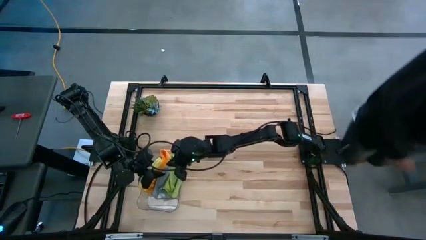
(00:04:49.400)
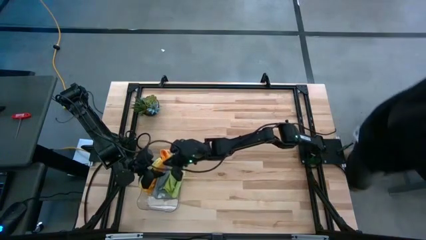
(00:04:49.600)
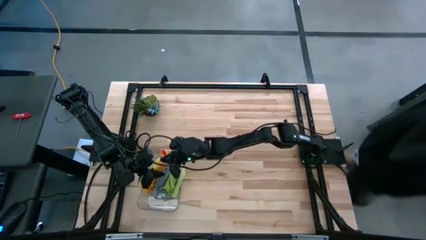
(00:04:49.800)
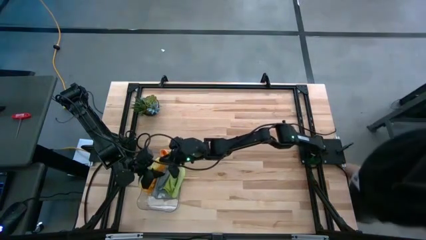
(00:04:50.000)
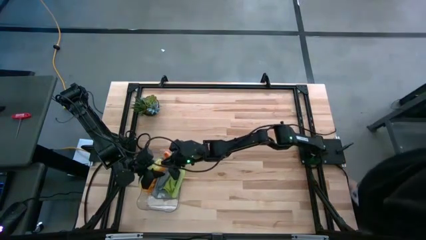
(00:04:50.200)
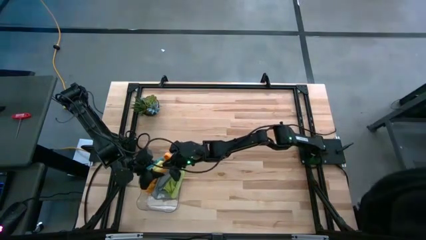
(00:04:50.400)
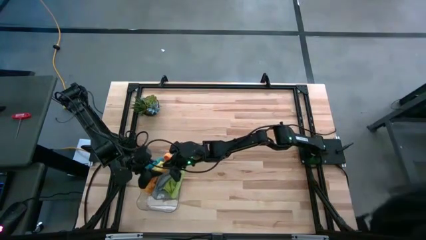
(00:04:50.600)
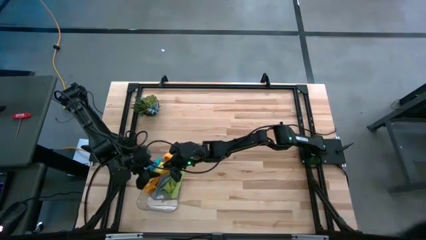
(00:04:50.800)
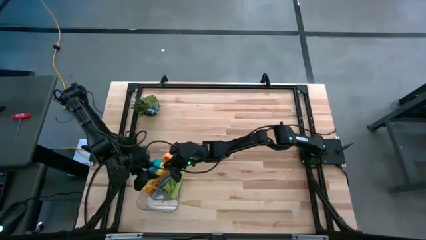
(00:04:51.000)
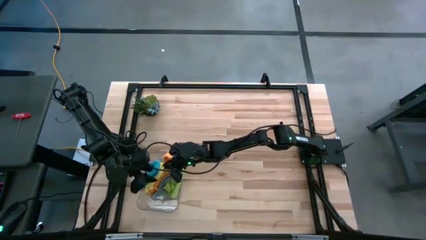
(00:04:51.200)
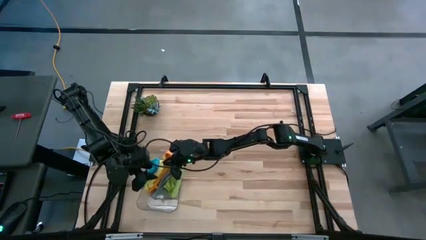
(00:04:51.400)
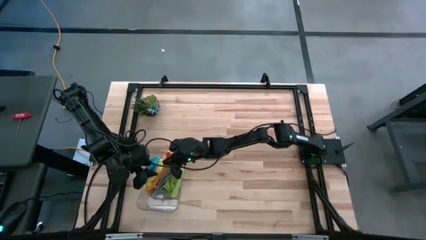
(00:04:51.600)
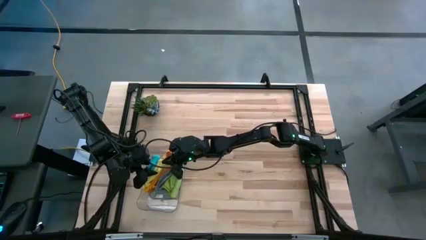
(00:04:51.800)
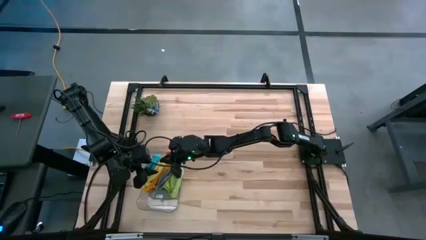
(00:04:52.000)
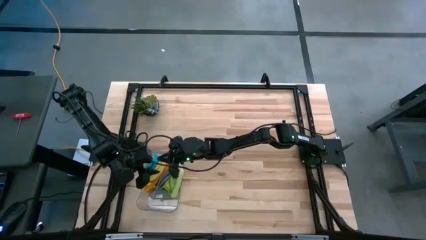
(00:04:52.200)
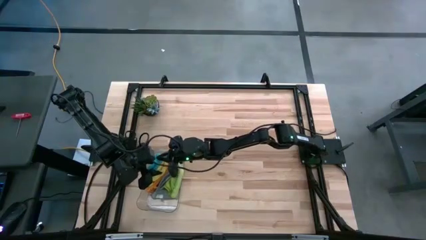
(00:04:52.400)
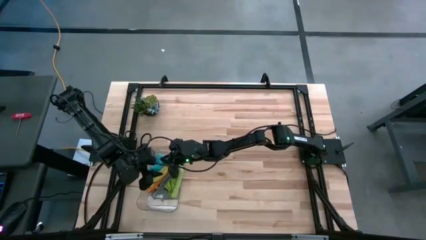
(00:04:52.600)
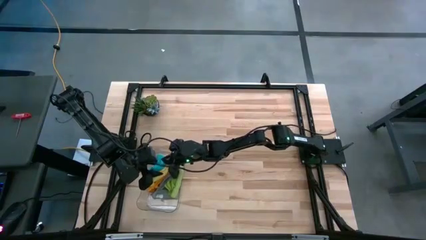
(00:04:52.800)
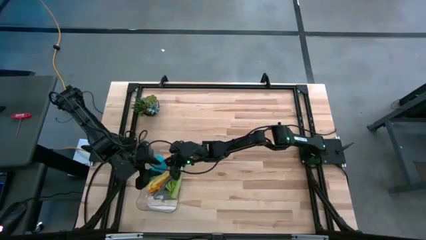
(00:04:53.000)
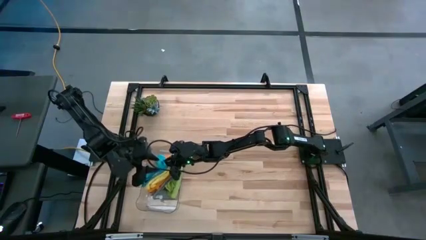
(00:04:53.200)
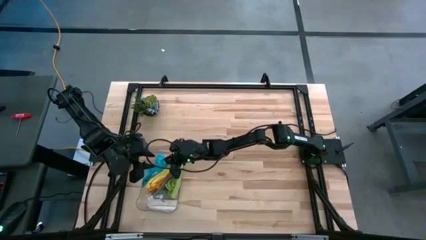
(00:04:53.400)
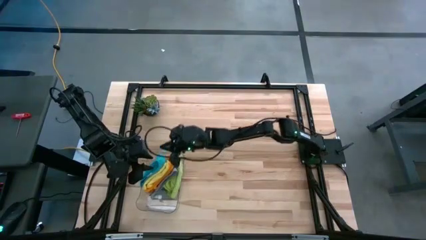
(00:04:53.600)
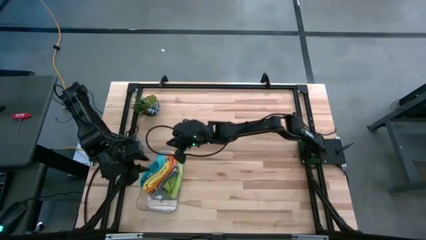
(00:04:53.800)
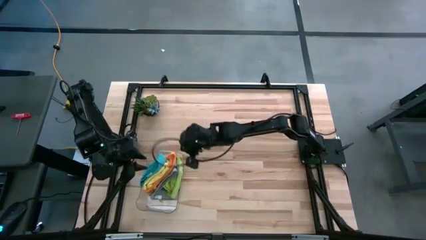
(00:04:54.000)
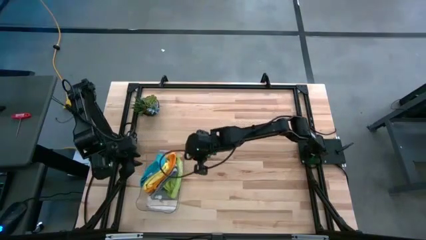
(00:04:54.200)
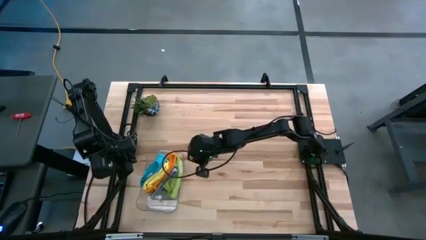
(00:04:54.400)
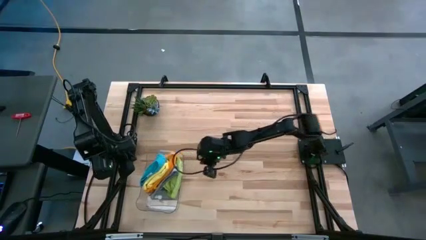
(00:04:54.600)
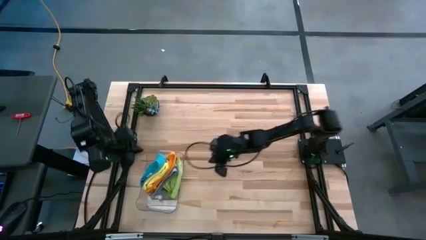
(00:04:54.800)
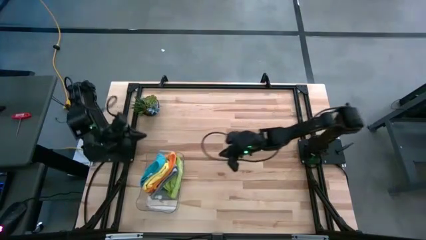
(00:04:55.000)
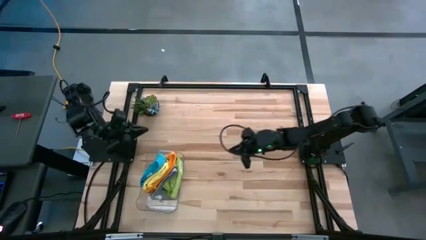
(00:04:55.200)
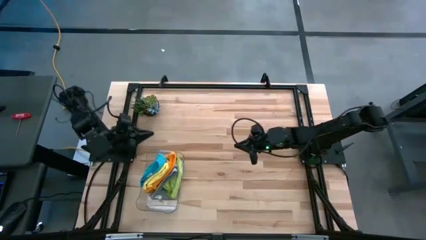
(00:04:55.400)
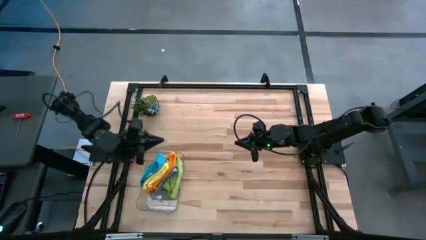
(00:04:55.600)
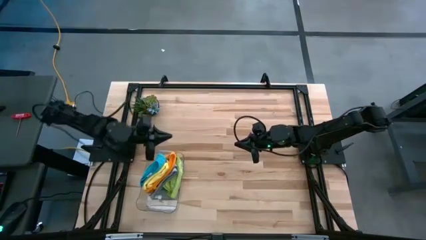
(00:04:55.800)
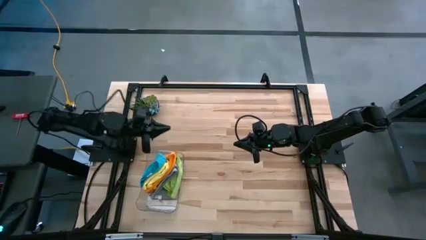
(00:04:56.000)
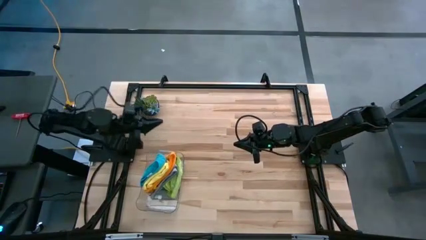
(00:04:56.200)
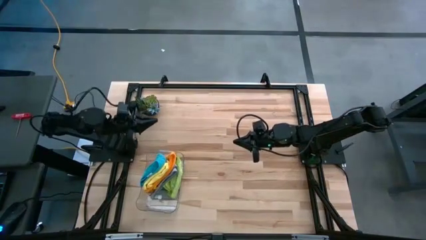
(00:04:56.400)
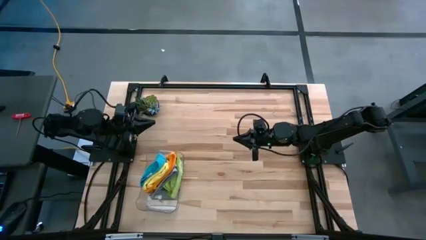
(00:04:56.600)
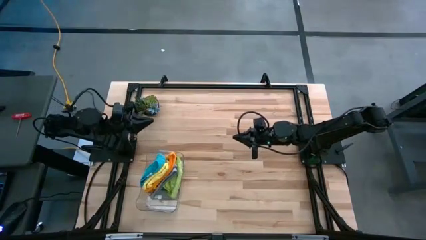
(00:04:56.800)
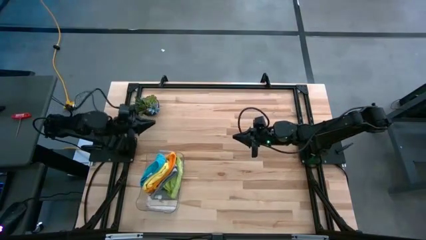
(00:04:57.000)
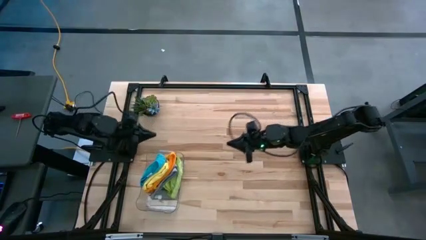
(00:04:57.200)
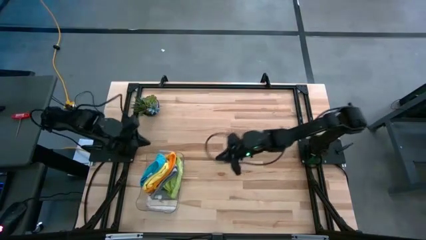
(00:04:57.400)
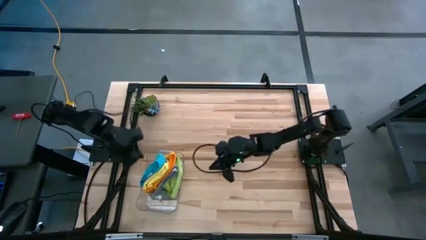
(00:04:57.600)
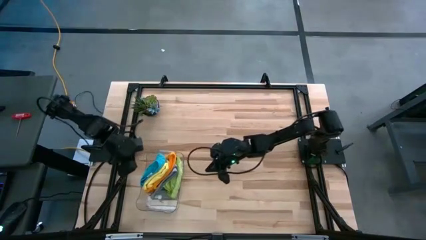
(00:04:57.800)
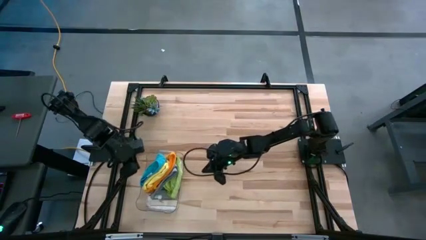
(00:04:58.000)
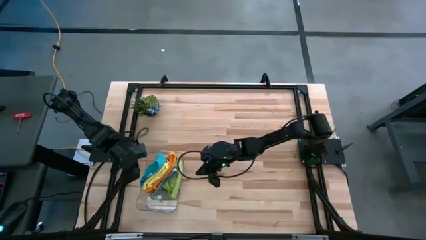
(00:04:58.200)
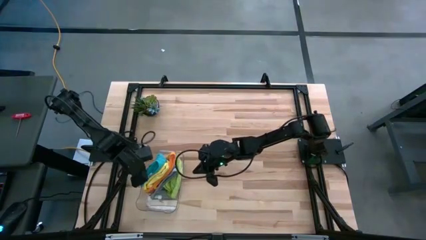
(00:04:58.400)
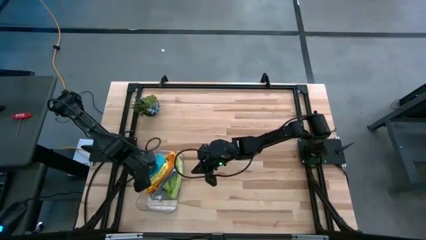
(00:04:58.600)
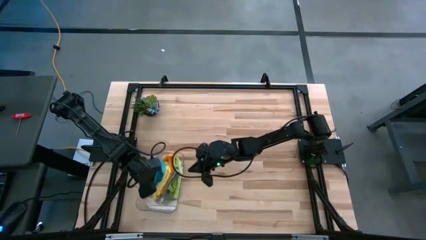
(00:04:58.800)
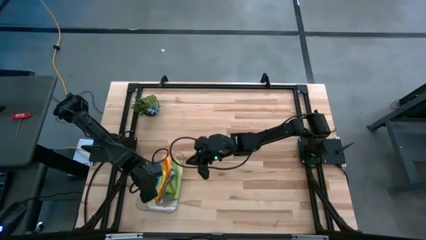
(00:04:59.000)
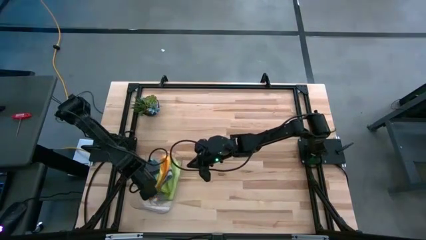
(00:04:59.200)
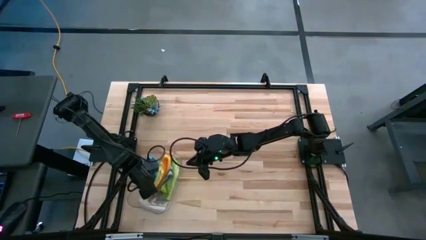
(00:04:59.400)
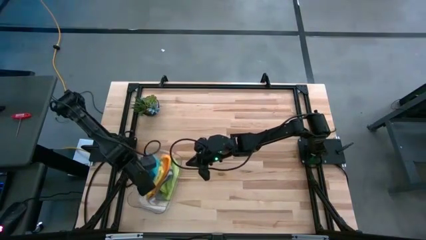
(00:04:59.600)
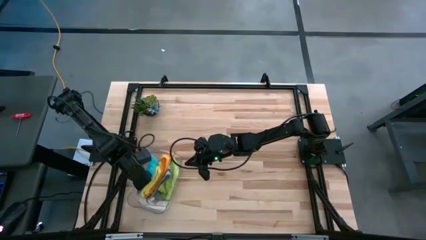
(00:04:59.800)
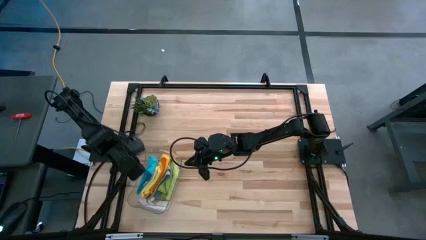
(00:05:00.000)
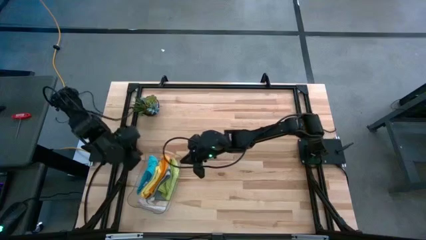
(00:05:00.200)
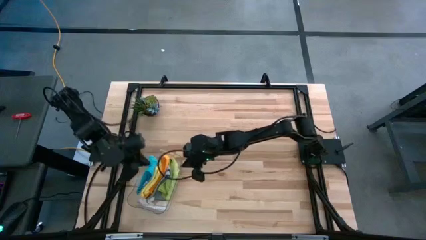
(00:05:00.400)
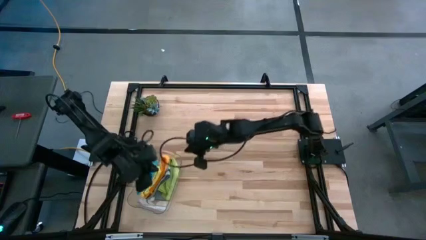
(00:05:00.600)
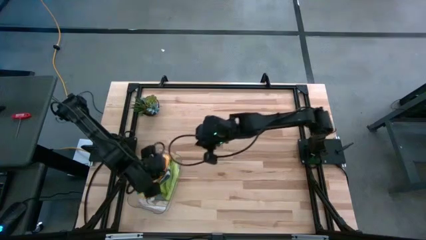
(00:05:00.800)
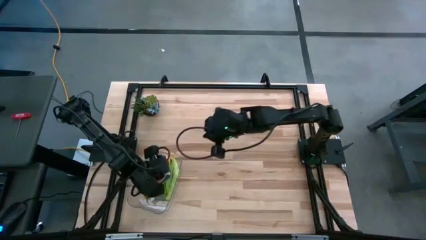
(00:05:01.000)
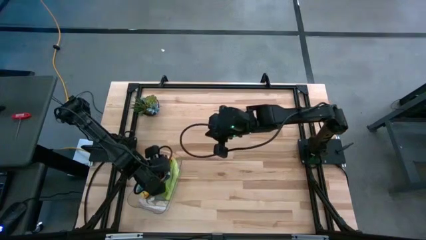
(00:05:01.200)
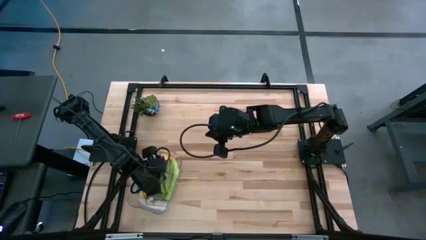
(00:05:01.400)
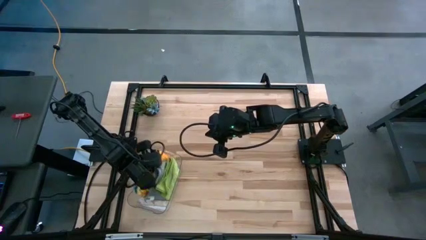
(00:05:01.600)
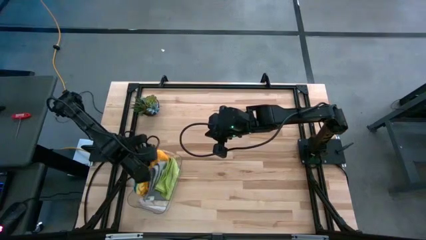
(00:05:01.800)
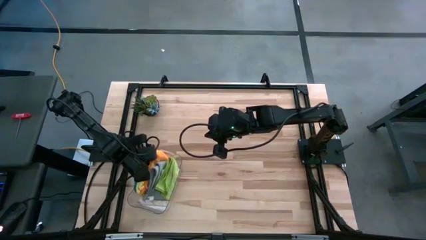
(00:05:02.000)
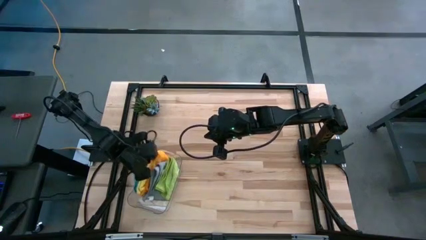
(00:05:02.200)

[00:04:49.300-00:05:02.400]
Task: Fold microfiber towels
Put the stacked towels into the transparent bin

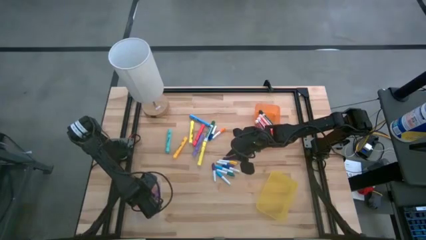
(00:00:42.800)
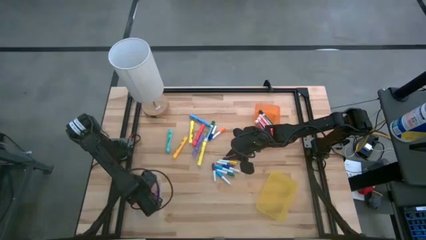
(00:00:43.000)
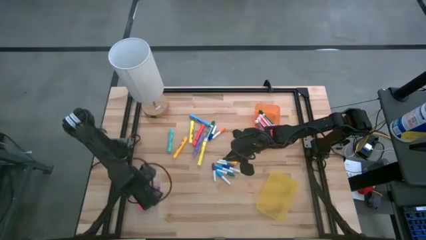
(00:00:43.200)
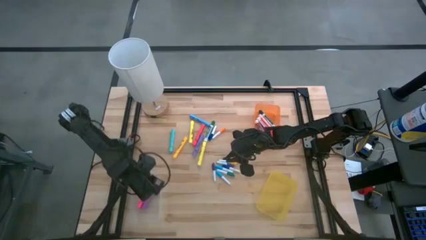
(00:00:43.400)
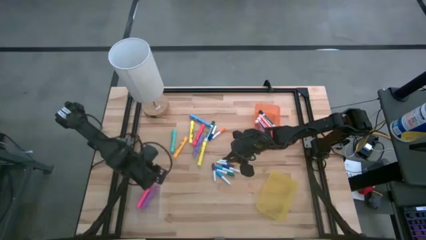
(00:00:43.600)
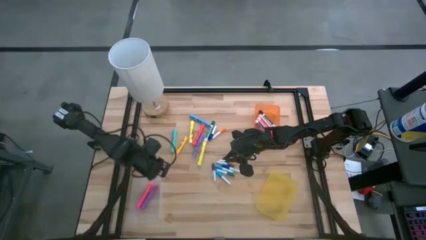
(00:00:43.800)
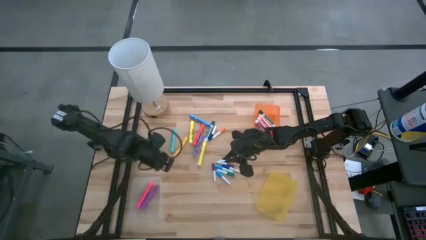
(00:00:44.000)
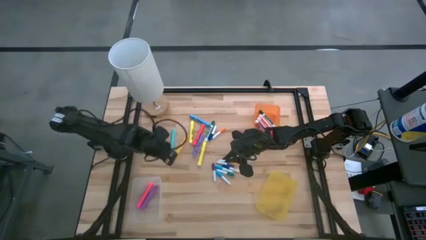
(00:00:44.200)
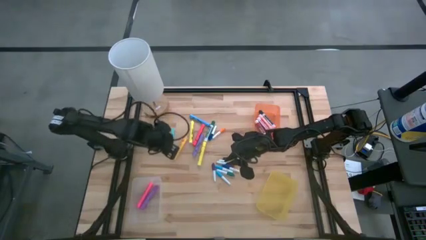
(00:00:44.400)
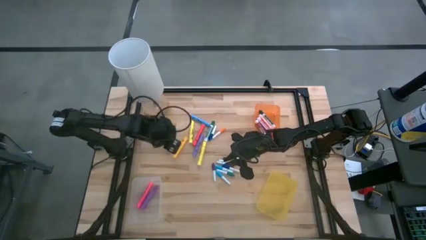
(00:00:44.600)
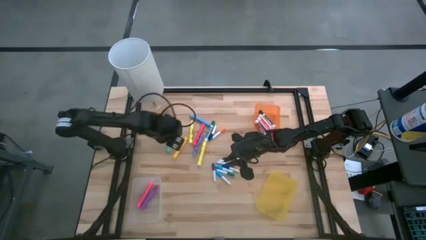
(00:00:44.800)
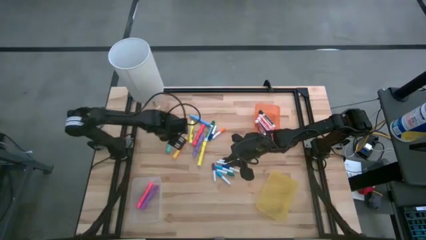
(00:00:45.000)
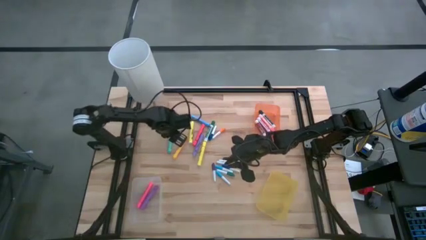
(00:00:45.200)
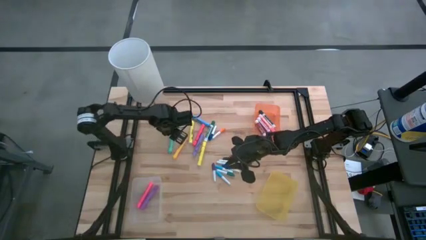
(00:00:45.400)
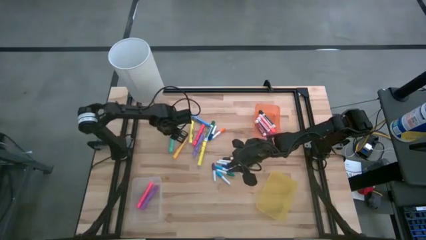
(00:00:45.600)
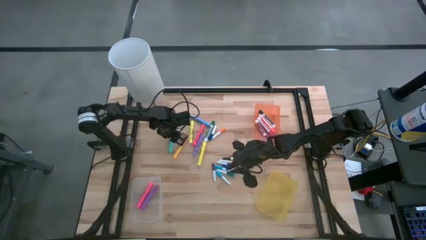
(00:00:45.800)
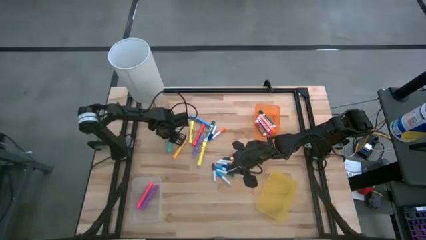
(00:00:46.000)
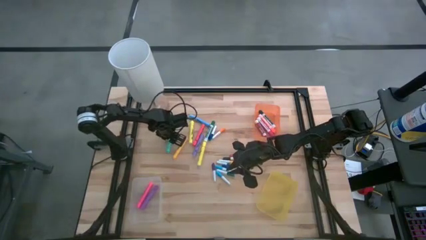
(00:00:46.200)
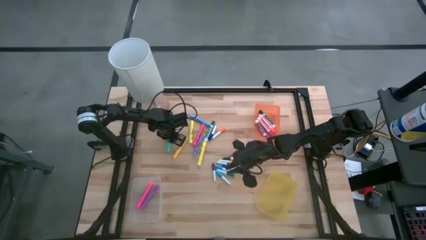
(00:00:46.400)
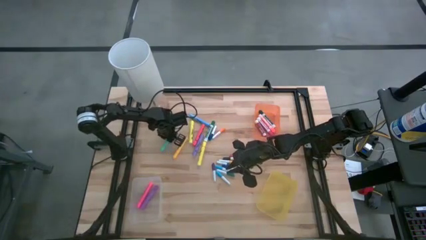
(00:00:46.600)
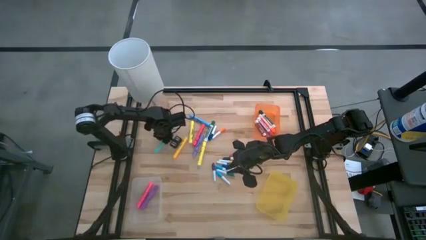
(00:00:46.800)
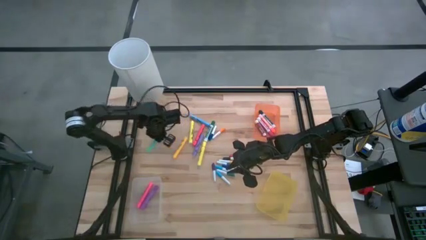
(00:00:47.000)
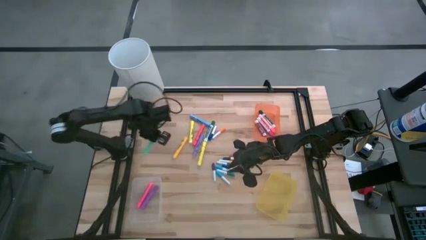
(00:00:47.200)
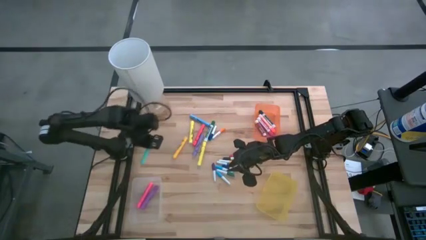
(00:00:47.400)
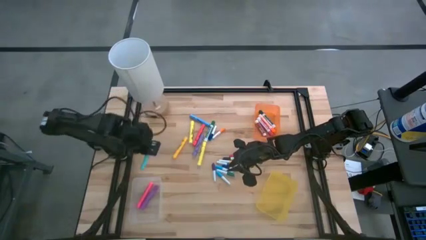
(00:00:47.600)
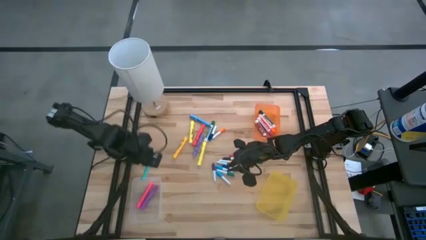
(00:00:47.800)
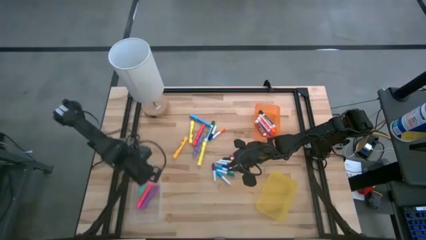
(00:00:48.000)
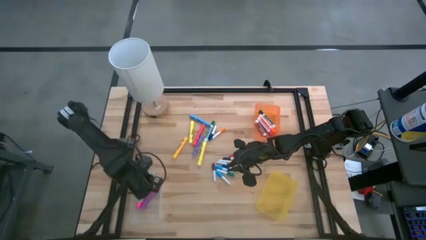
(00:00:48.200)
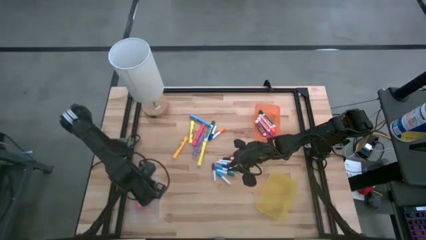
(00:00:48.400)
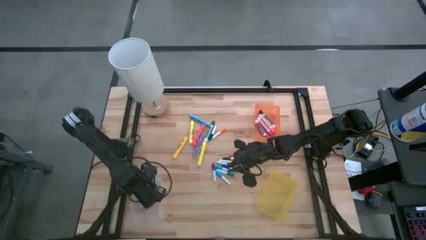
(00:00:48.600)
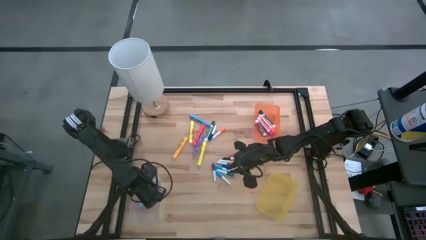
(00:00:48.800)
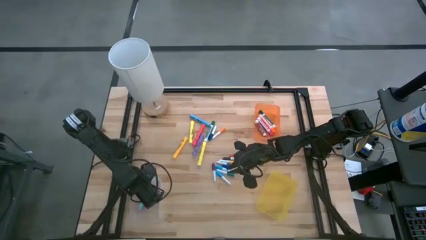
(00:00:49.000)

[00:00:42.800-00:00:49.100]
Task: Pick & Place Markers
Put the blue marker pen into the transparent bin
